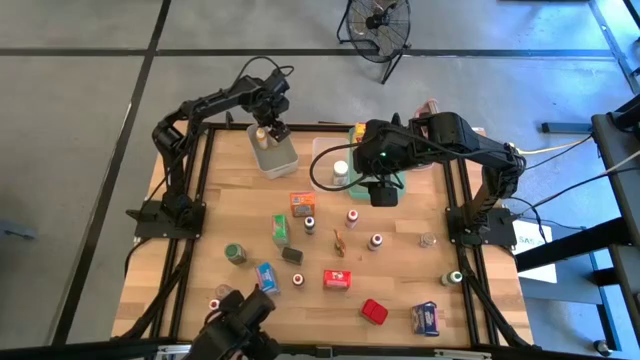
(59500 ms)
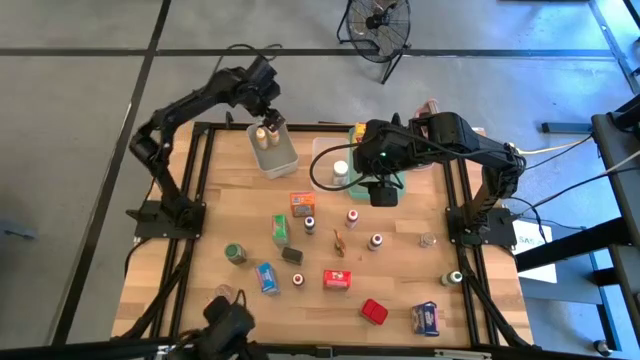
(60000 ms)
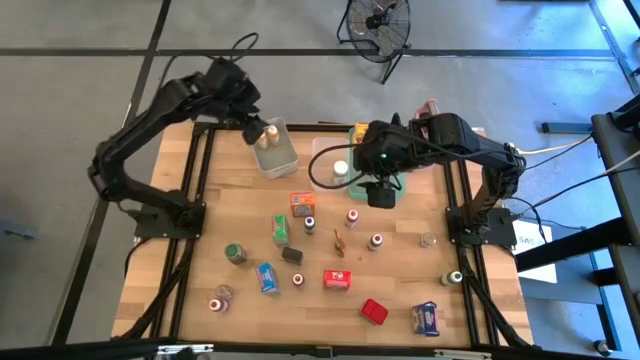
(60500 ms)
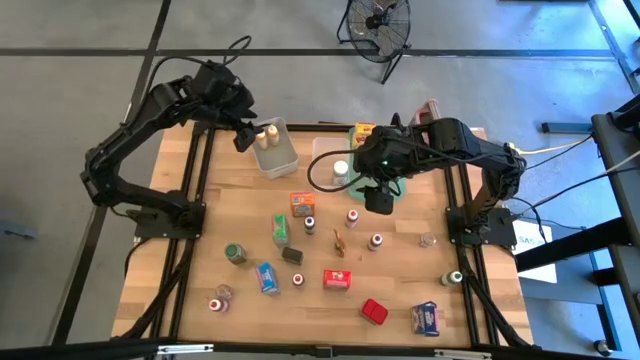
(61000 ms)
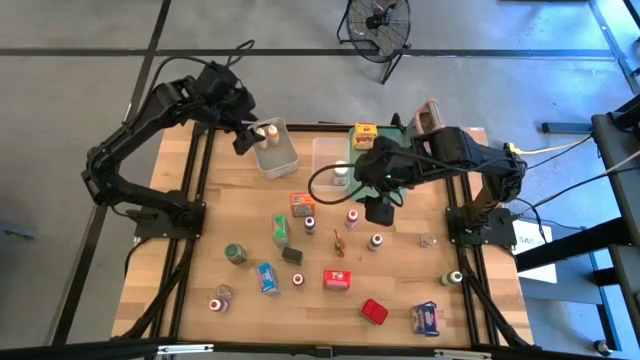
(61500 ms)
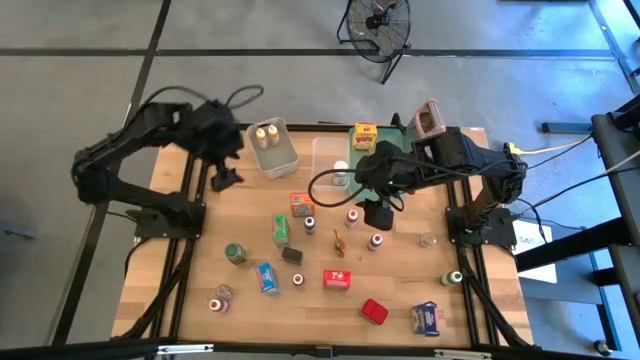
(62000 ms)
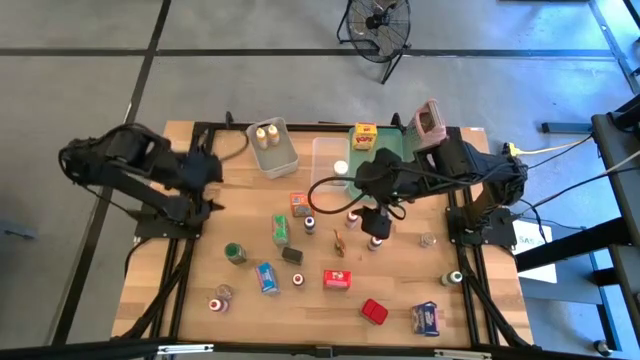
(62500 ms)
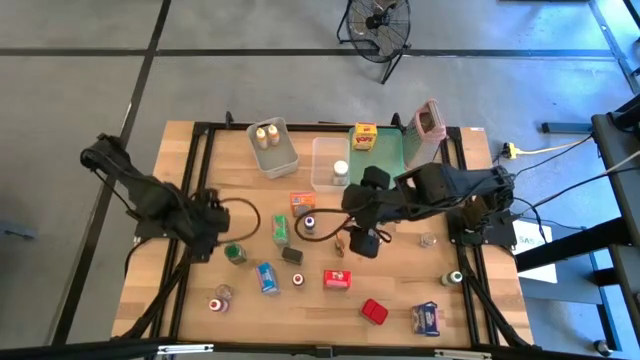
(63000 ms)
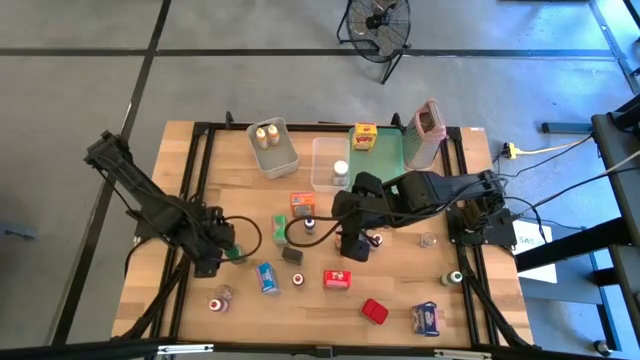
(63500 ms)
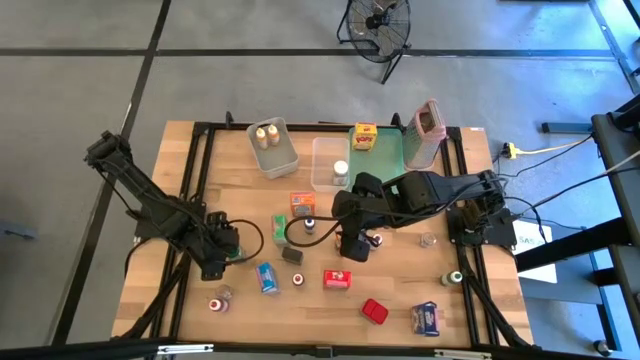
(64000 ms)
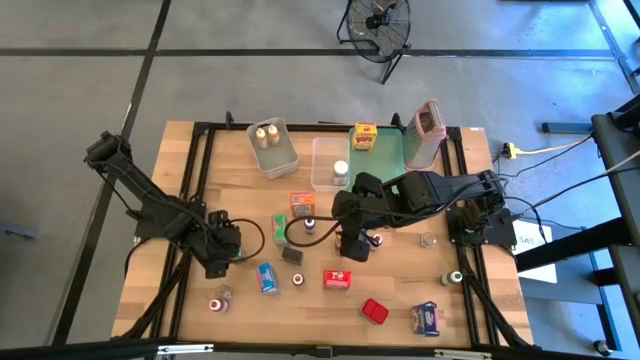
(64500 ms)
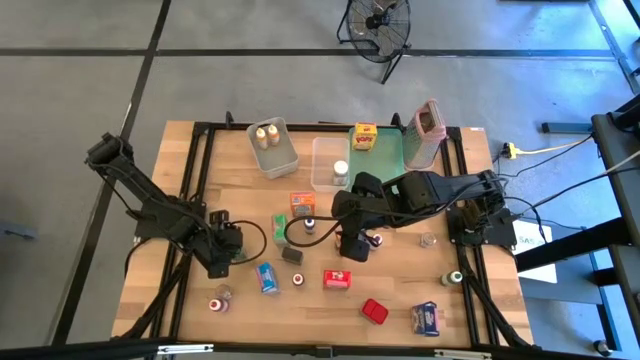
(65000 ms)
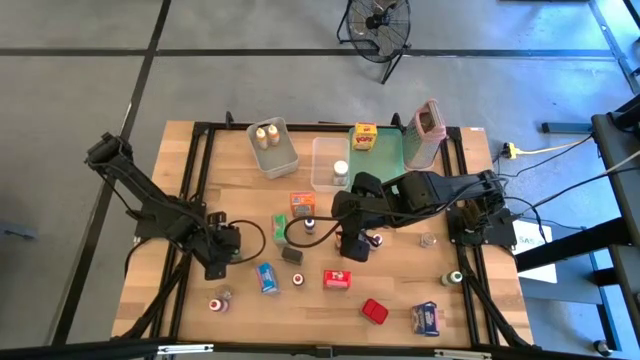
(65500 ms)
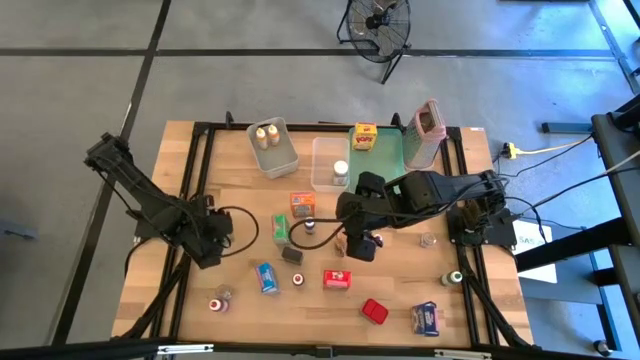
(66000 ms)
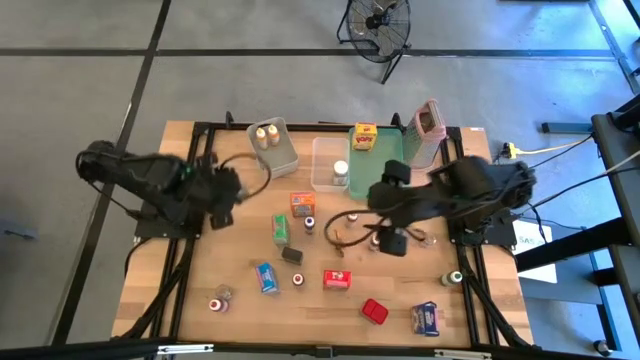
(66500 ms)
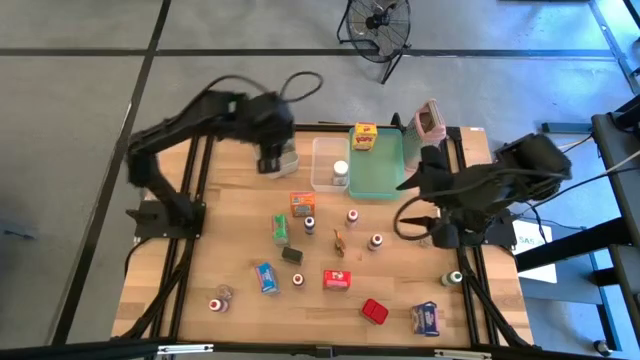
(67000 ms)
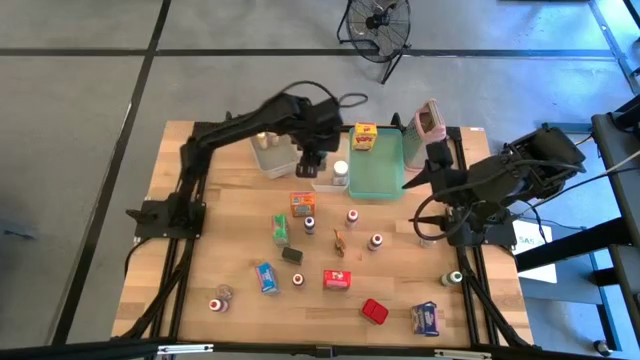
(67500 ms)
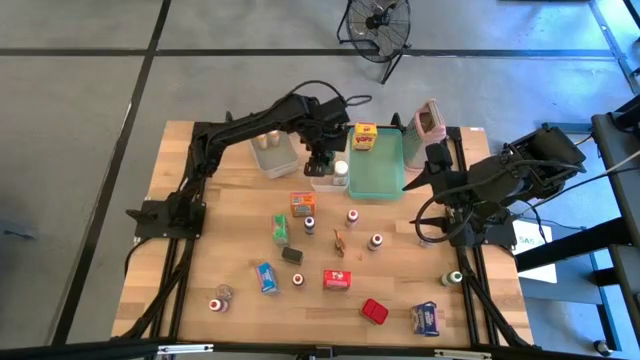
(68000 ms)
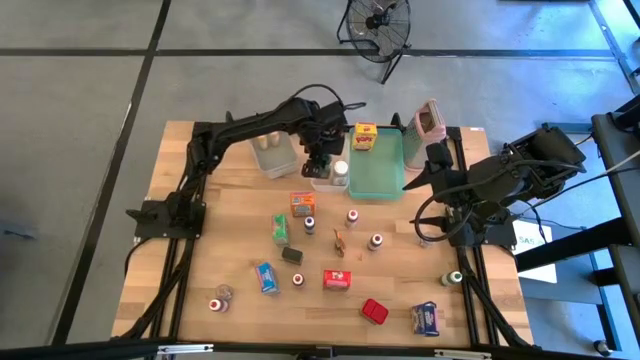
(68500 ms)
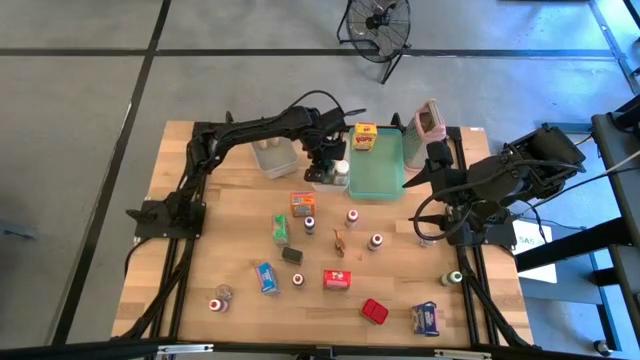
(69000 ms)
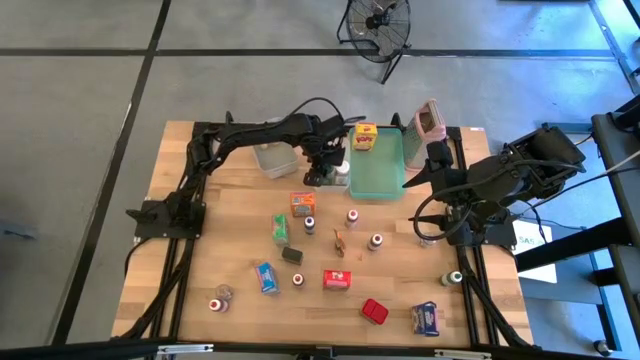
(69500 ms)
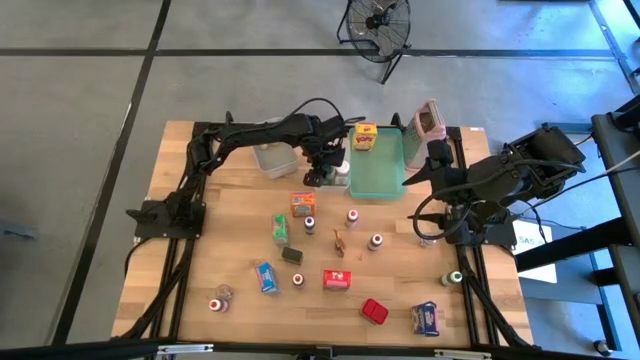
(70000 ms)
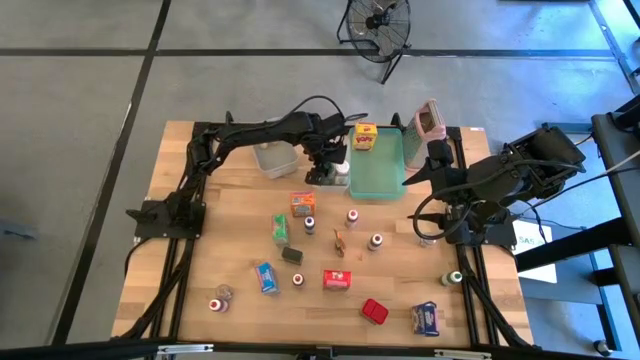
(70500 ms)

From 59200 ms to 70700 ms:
Task: Pick & Place Kitchen Items
Put the green seasoning bottle into the white bin

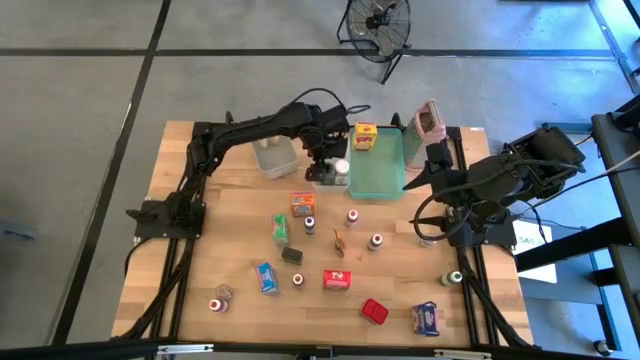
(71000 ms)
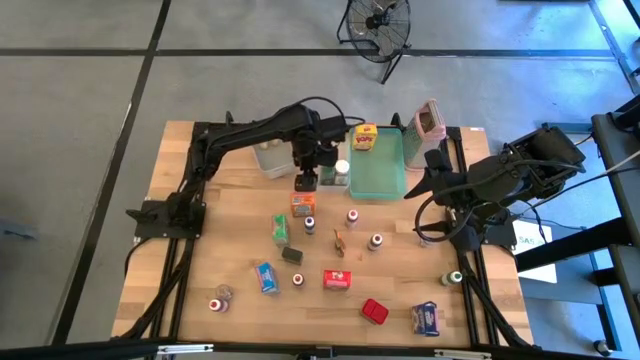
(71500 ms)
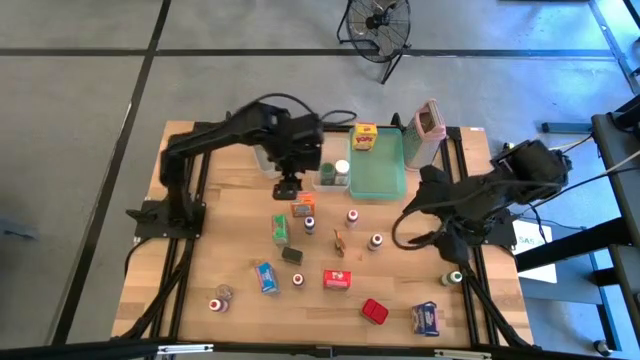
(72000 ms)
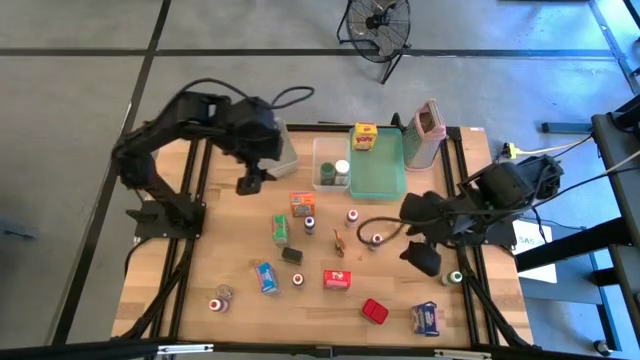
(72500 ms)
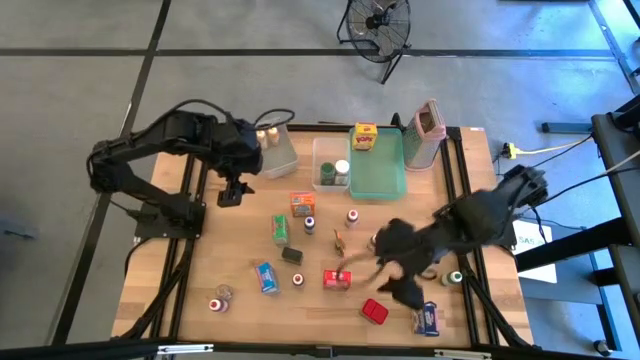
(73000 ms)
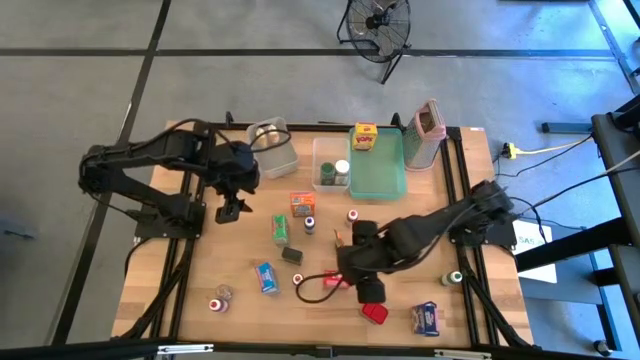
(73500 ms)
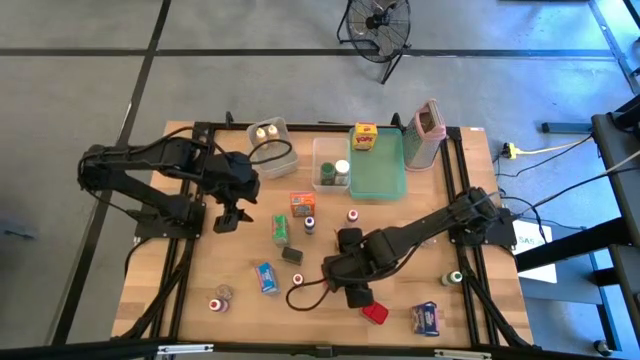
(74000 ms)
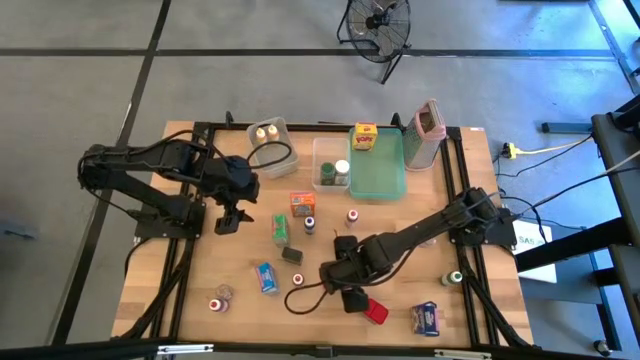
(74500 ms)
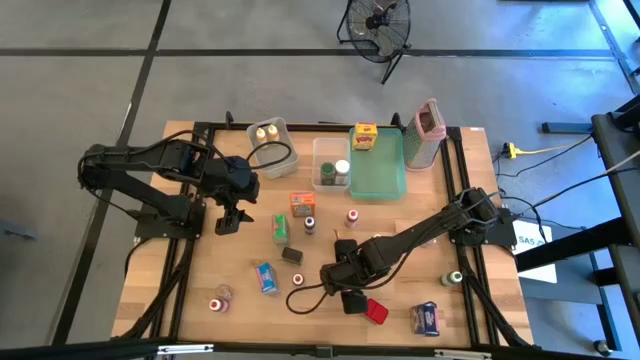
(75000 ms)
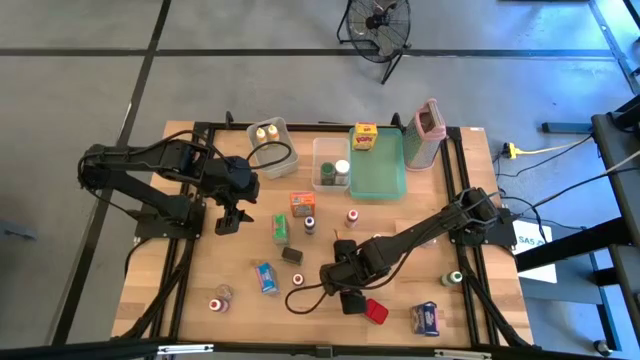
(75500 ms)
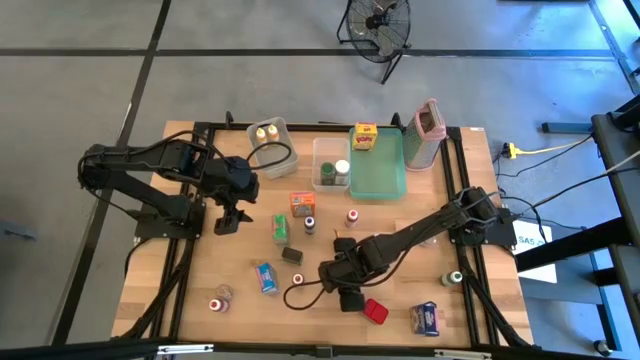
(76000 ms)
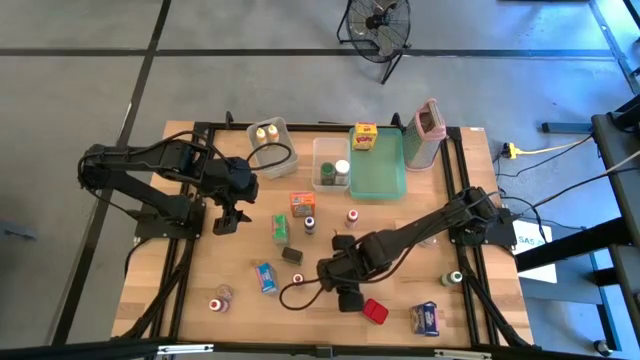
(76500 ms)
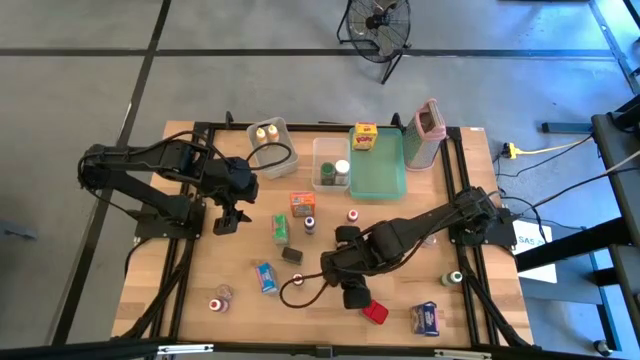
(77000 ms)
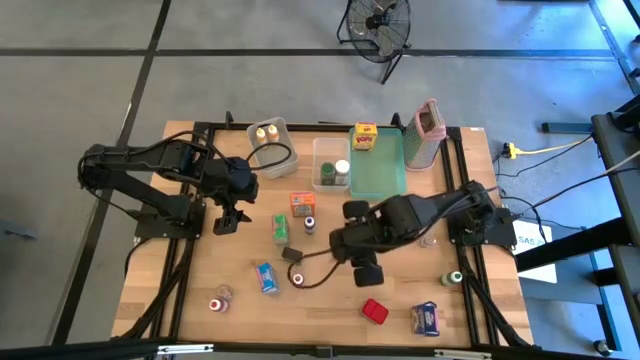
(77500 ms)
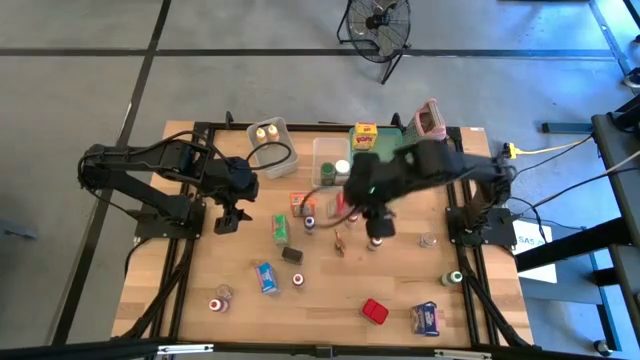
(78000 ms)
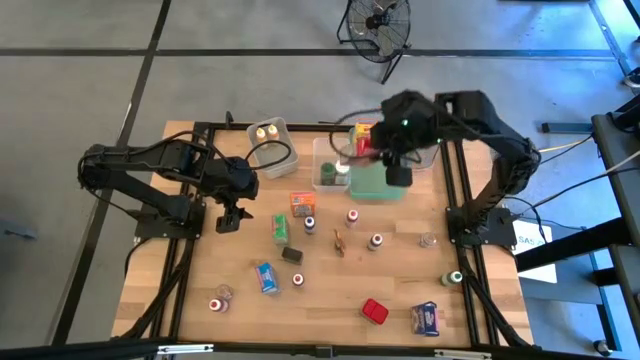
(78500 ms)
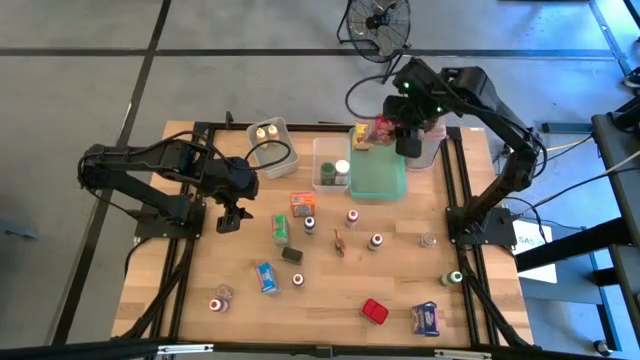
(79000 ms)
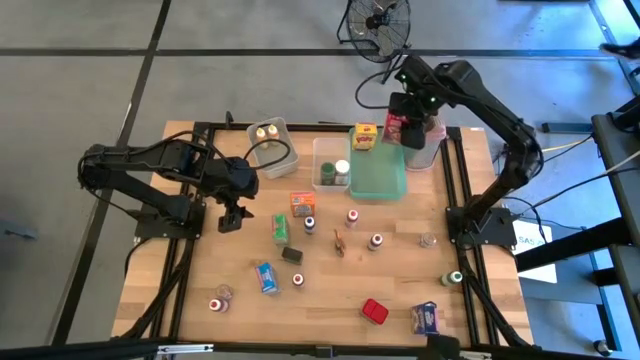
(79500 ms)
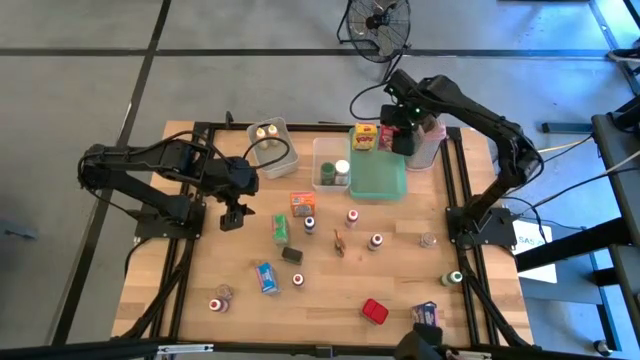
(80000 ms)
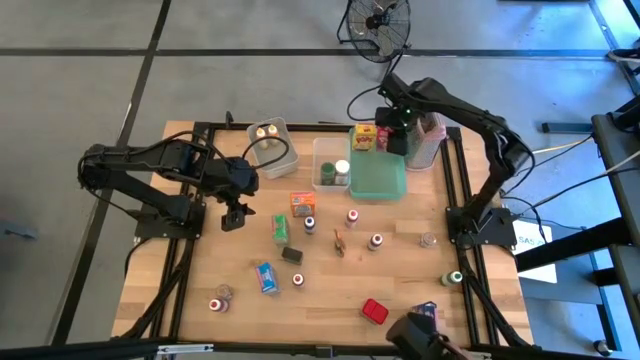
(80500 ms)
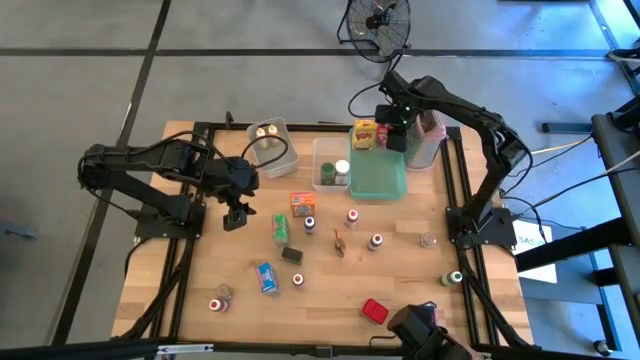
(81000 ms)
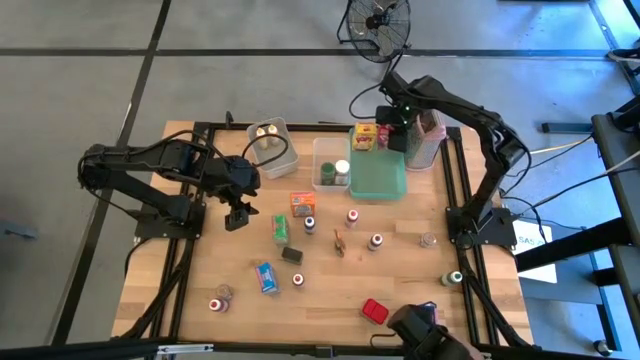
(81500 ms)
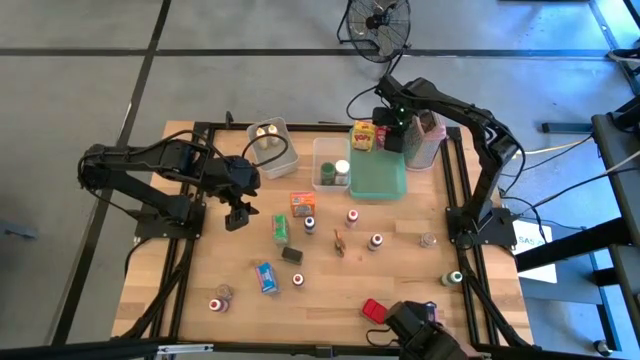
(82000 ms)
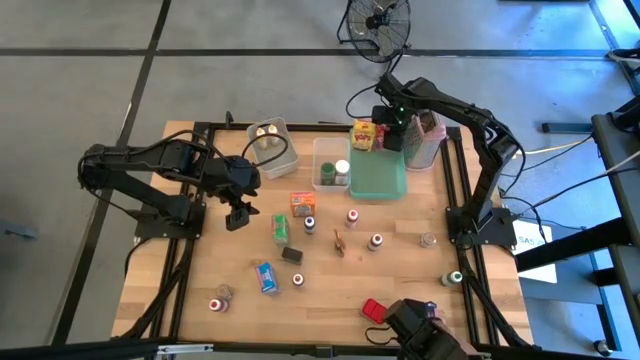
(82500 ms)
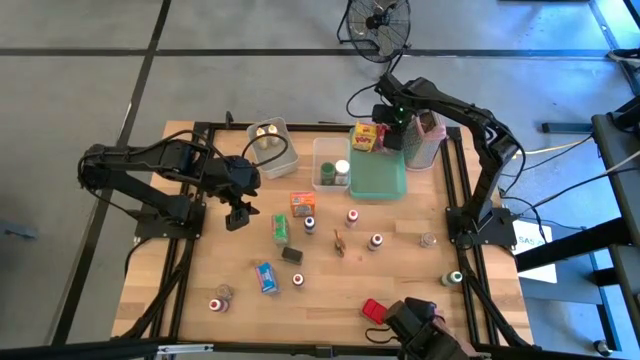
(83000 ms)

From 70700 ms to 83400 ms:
Put the red cereal box into the green bin
